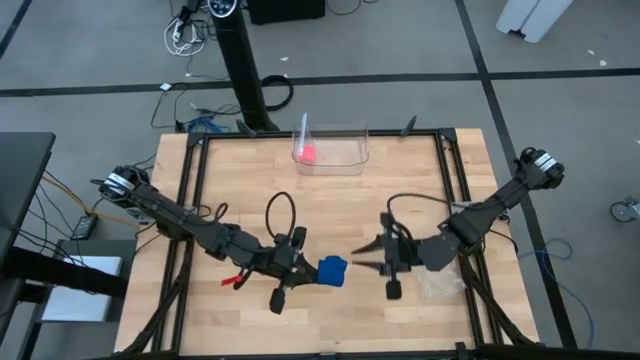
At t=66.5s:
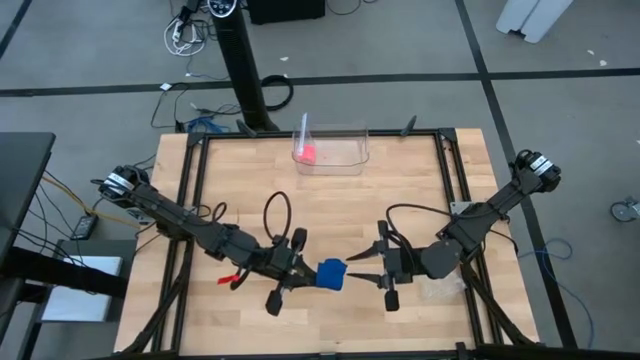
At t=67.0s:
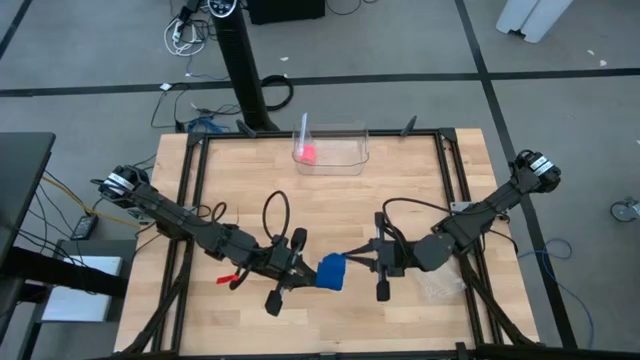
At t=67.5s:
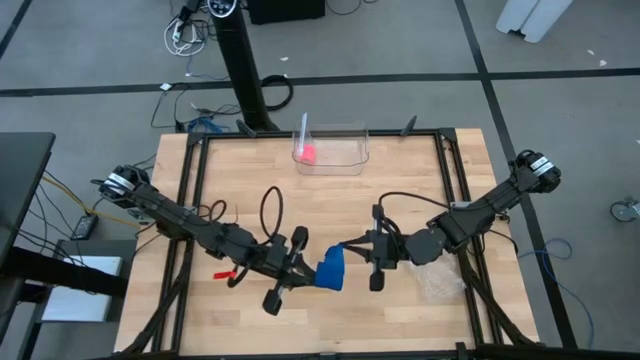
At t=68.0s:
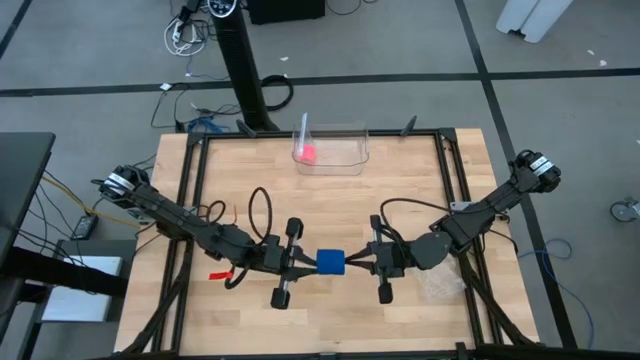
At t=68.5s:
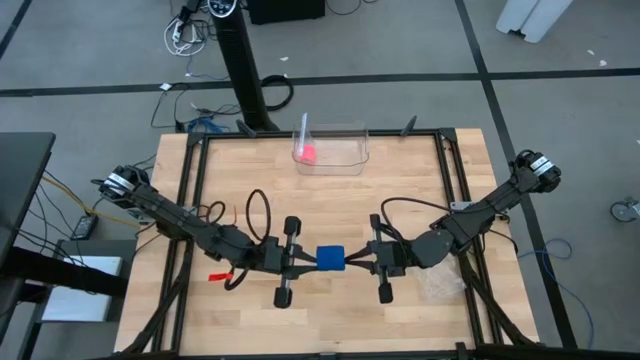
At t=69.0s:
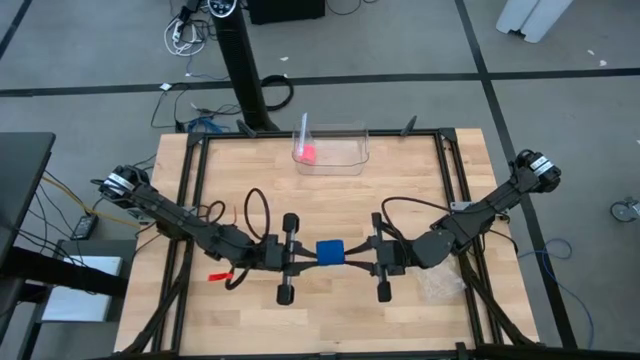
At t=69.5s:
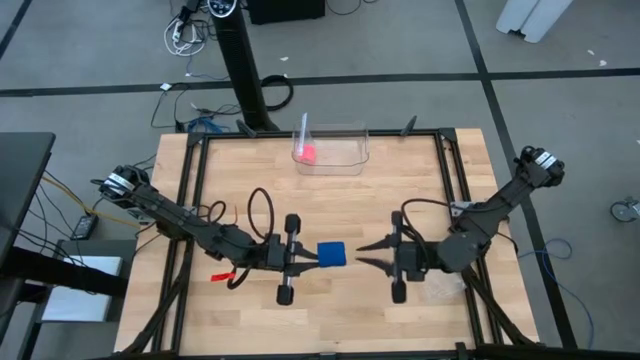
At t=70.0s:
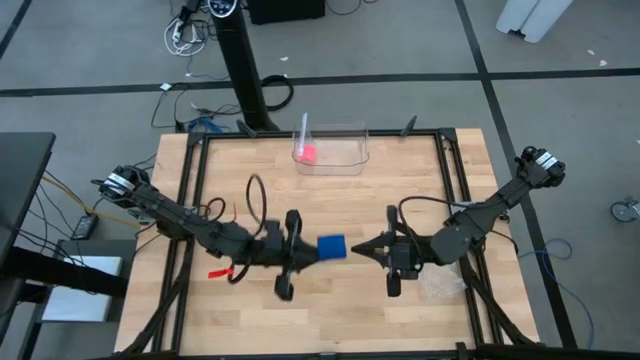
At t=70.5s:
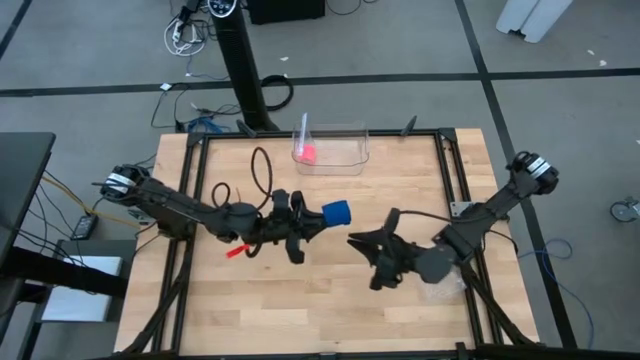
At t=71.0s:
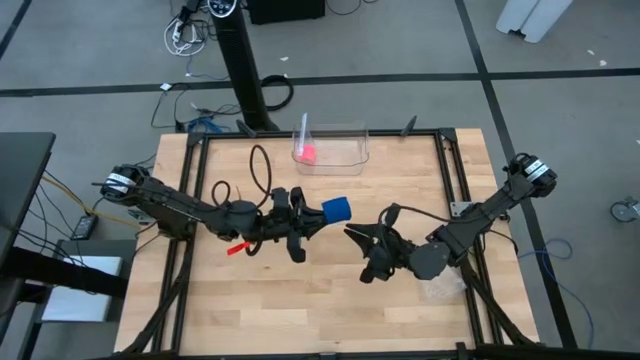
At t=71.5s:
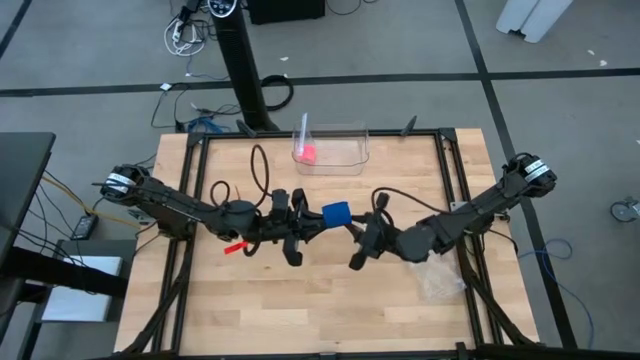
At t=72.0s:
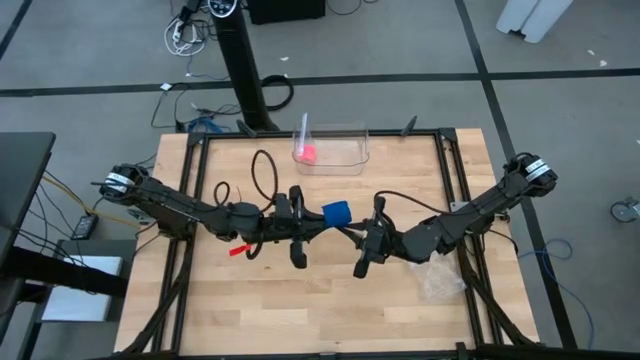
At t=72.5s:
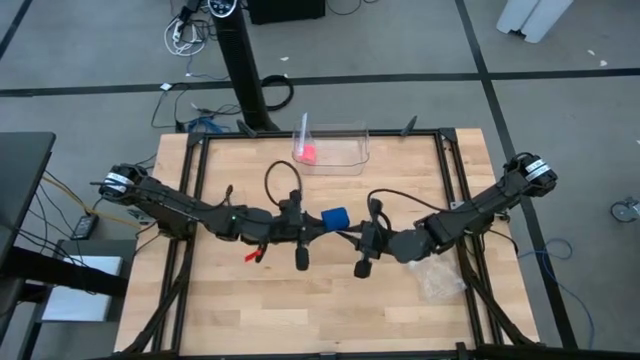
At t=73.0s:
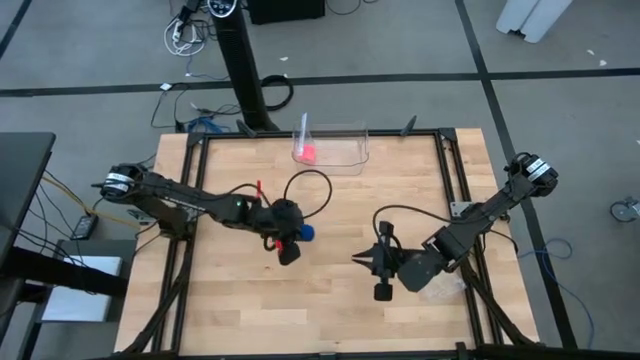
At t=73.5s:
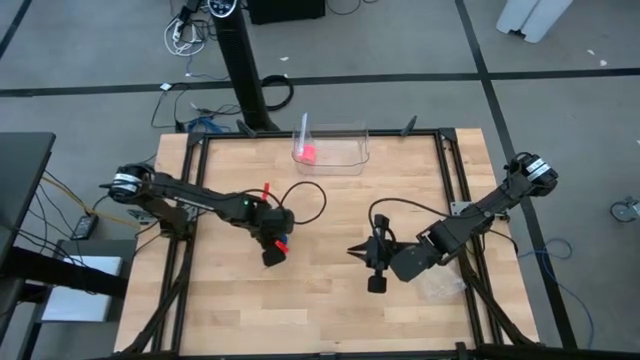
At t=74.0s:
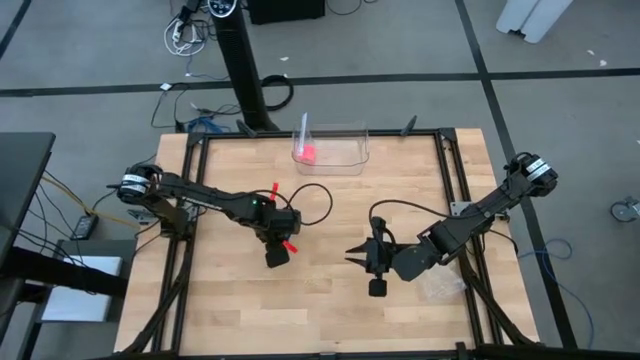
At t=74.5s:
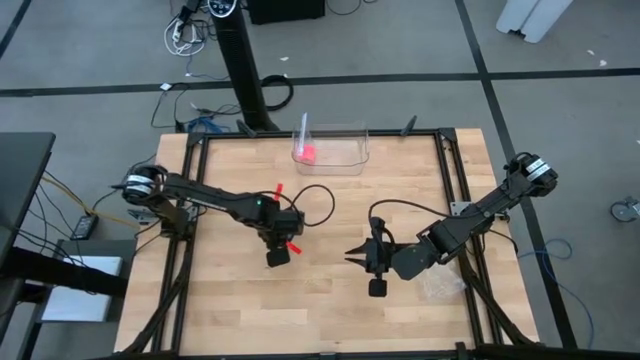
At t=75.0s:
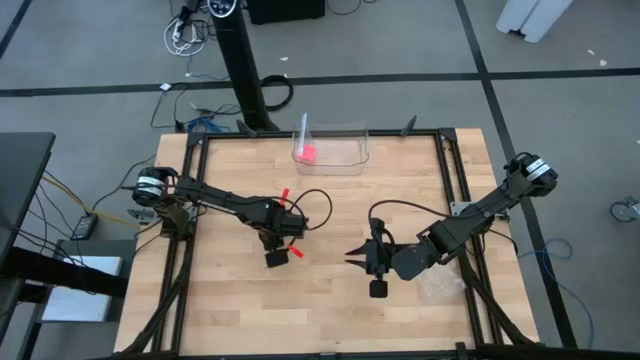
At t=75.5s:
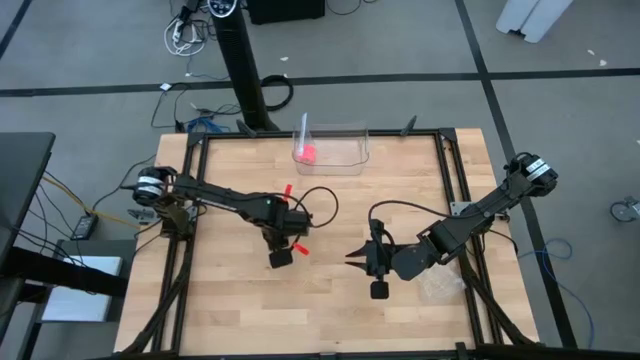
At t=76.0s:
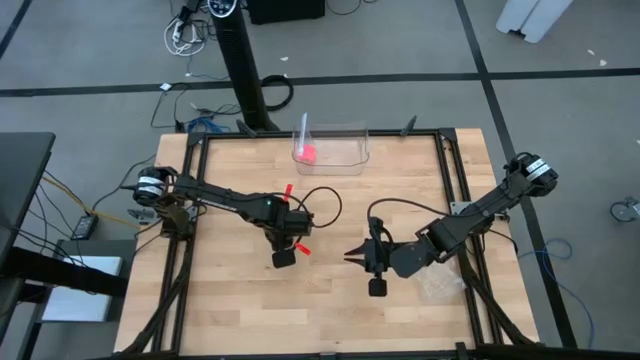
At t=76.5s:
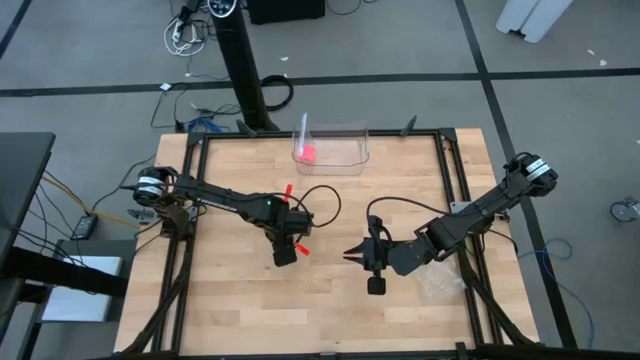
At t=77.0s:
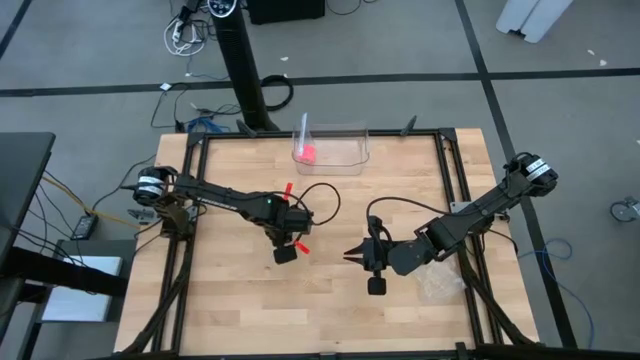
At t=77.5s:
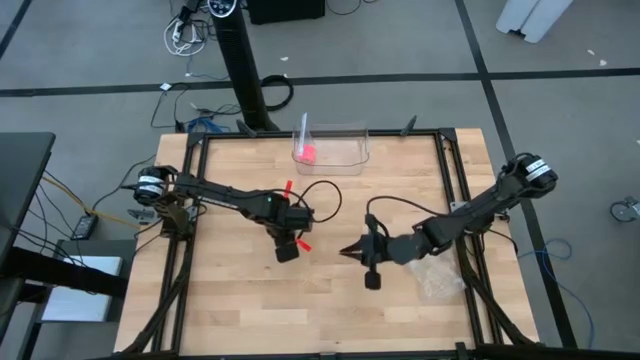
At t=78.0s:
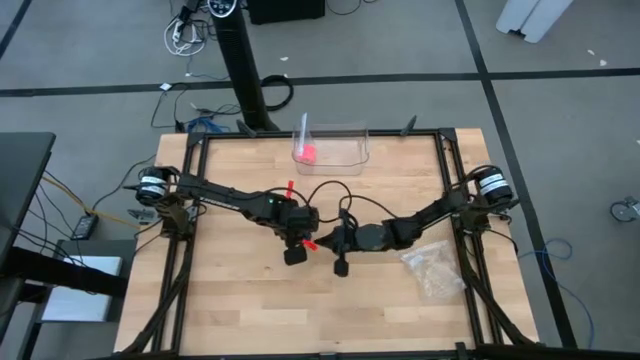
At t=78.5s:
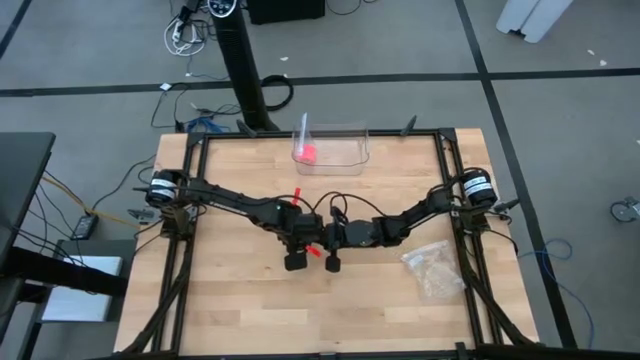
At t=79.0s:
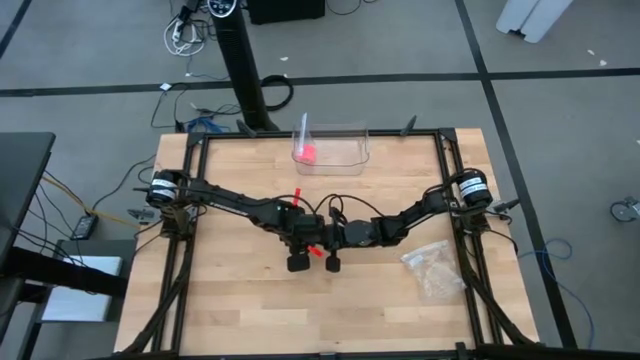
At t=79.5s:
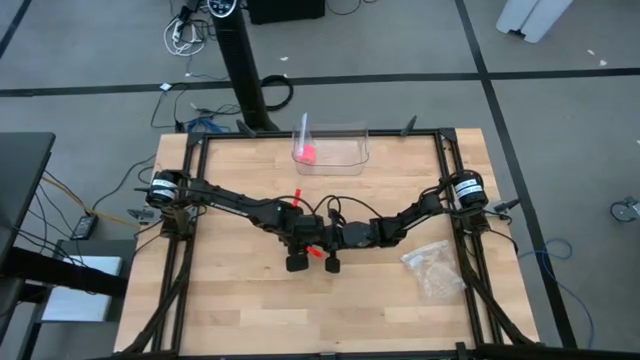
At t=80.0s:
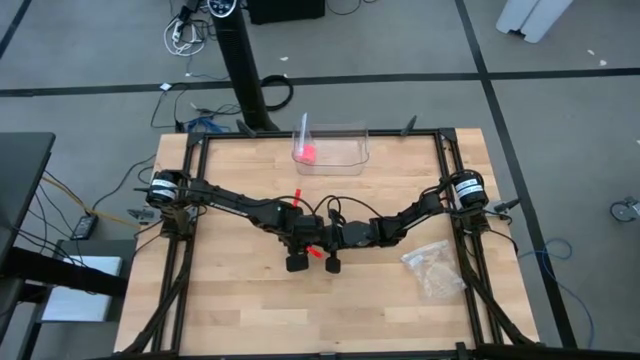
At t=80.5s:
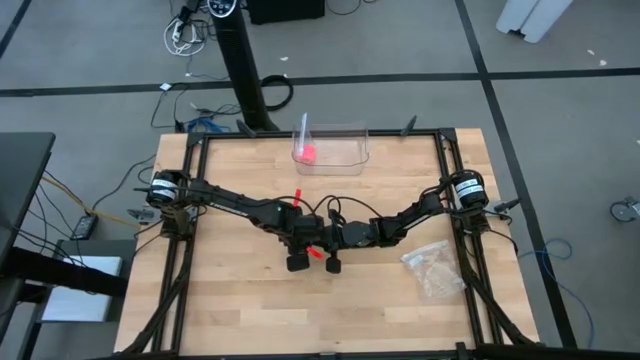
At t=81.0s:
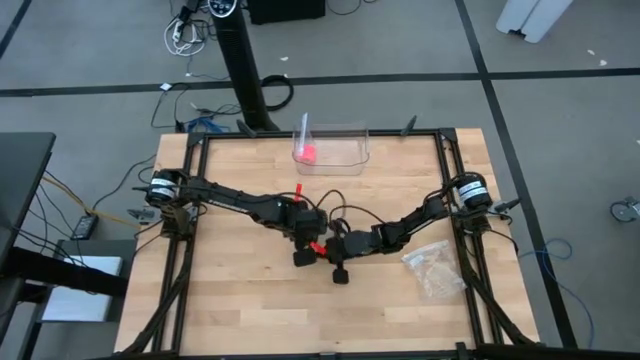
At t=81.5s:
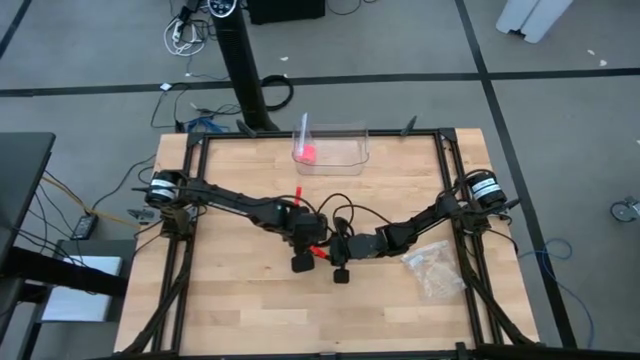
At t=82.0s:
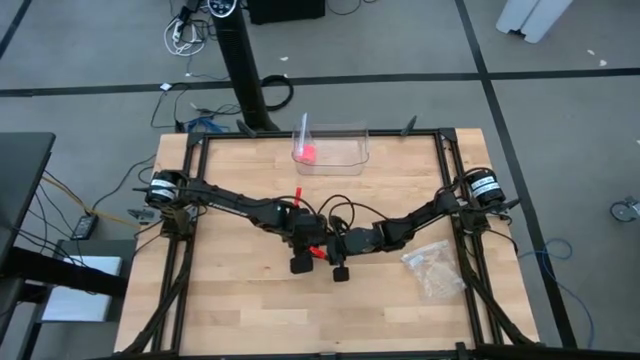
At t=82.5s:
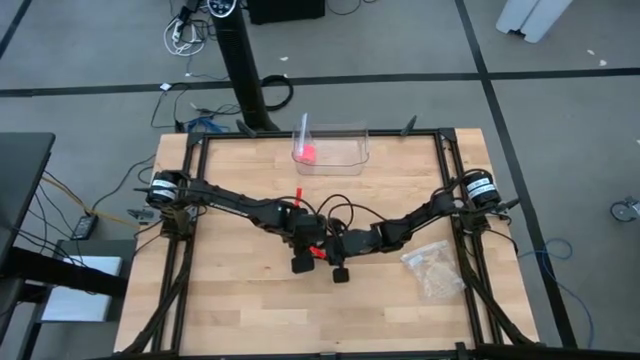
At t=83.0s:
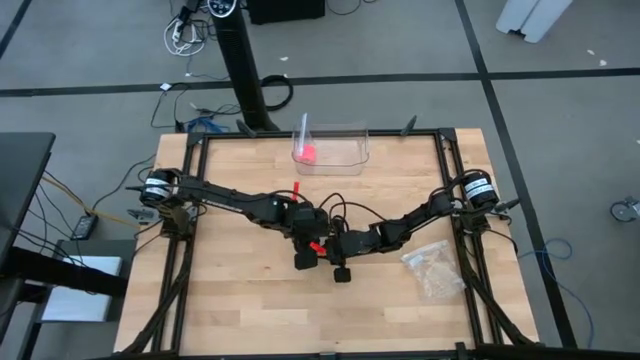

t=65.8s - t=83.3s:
Task: Roll bandage
Roll the blue bandage

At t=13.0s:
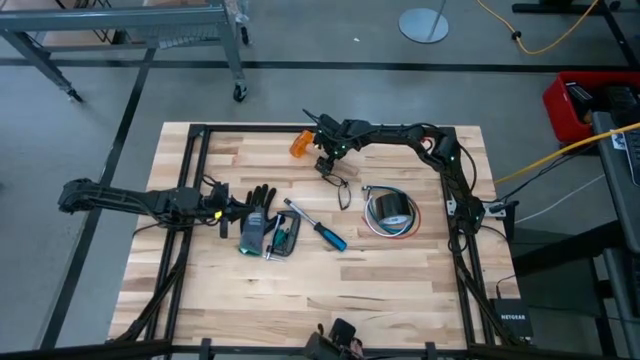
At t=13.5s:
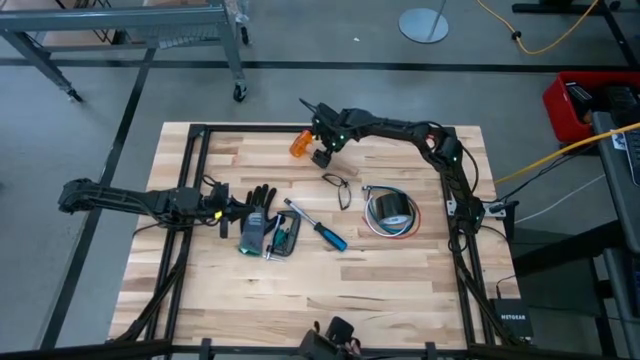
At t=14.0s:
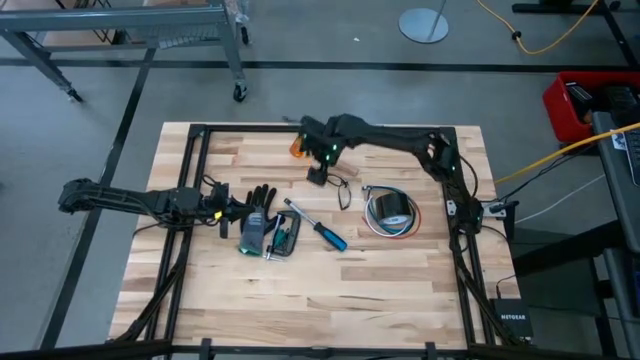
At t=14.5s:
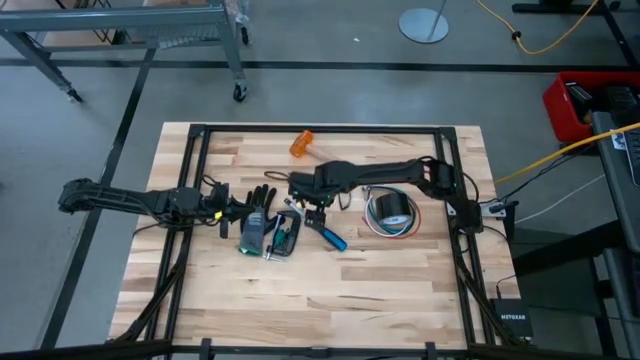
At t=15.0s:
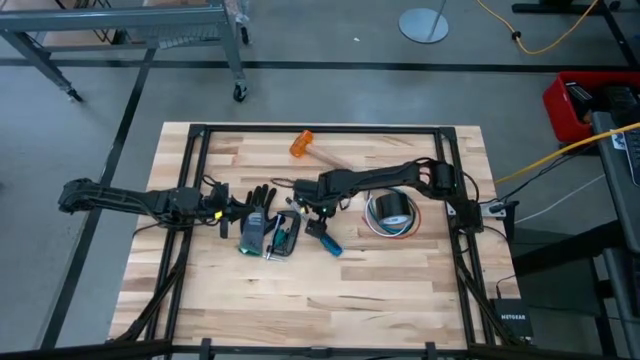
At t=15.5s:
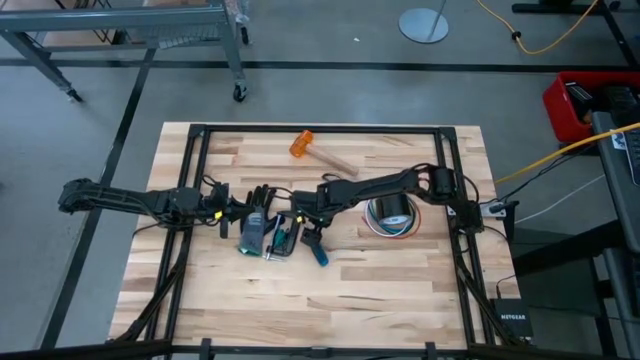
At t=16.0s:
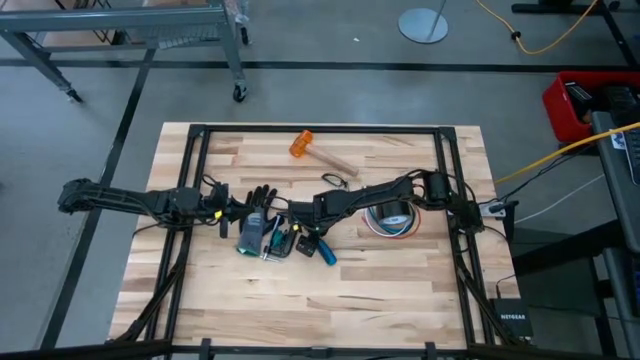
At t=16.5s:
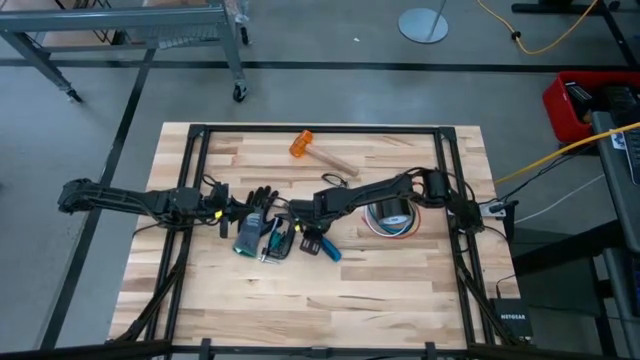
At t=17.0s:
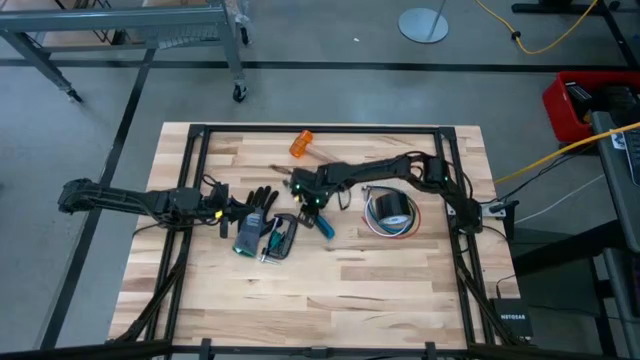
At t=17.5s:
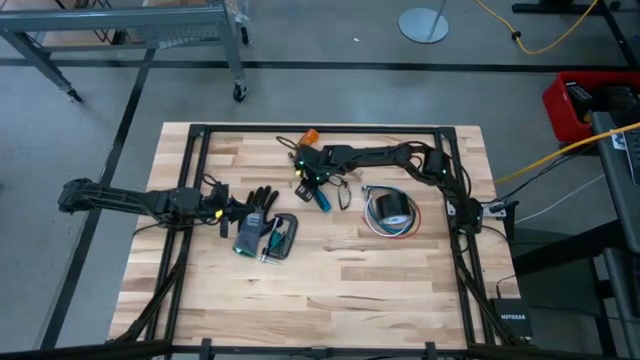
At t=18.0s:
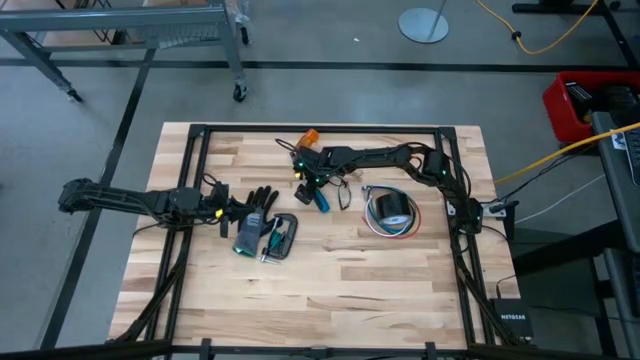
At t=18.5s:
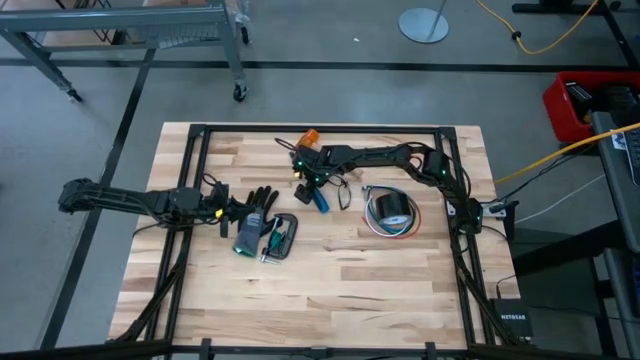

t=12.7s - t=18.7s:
Task: Coil cords
Move the chisel to the top of the table
